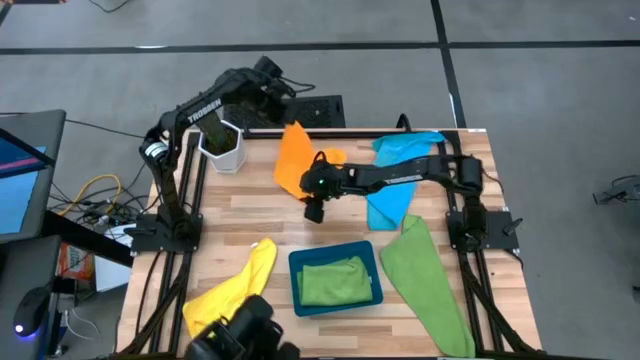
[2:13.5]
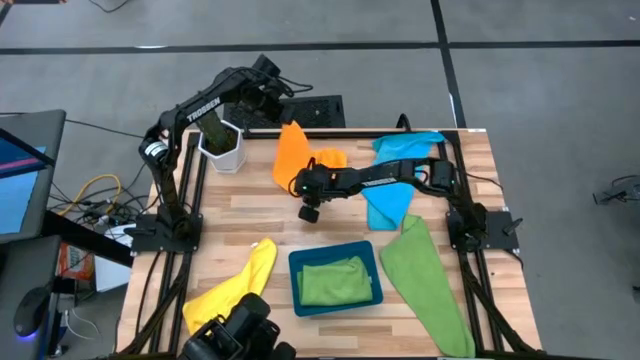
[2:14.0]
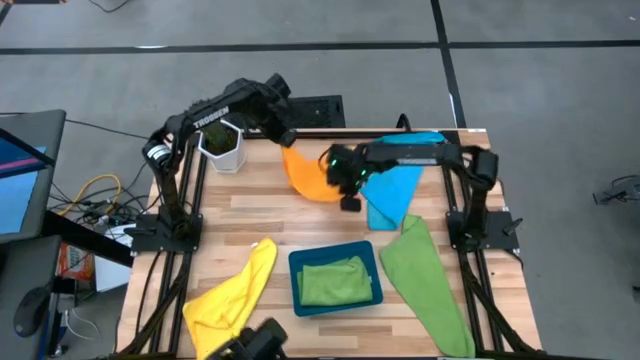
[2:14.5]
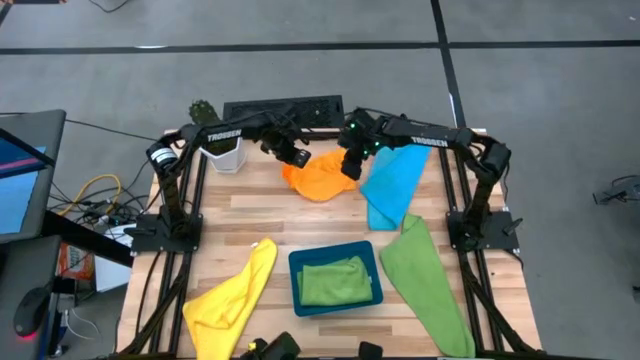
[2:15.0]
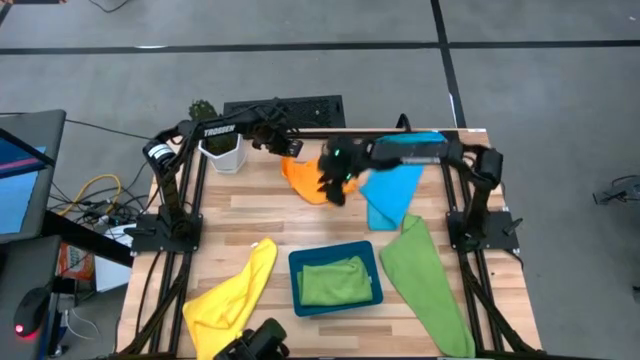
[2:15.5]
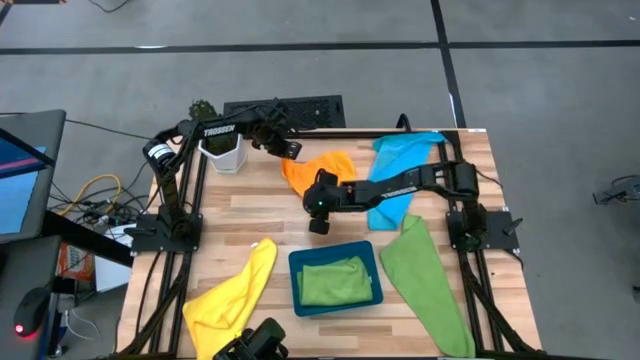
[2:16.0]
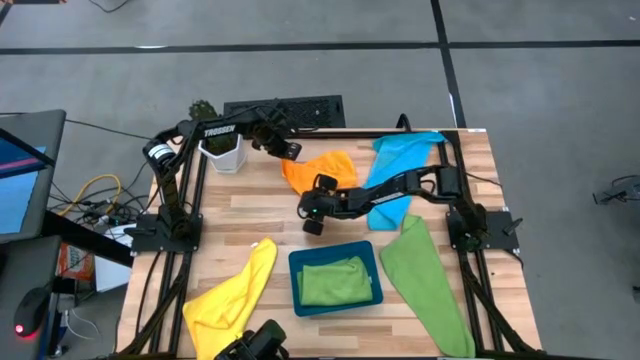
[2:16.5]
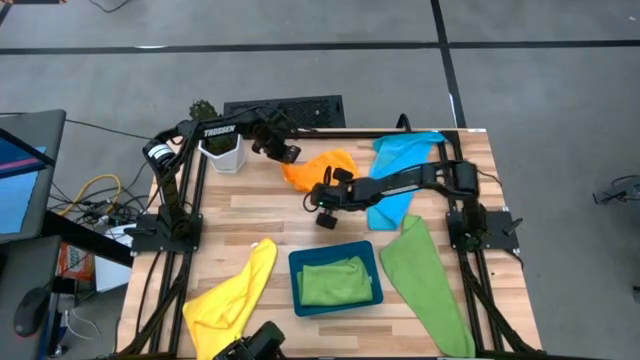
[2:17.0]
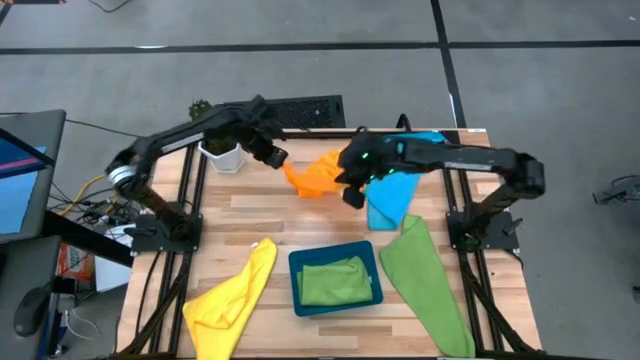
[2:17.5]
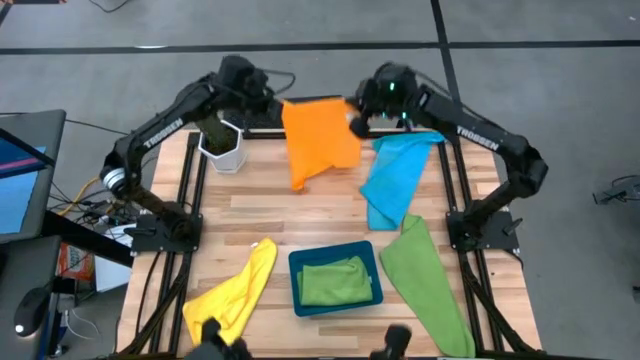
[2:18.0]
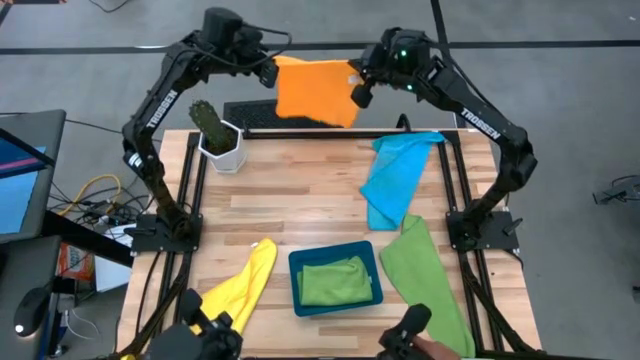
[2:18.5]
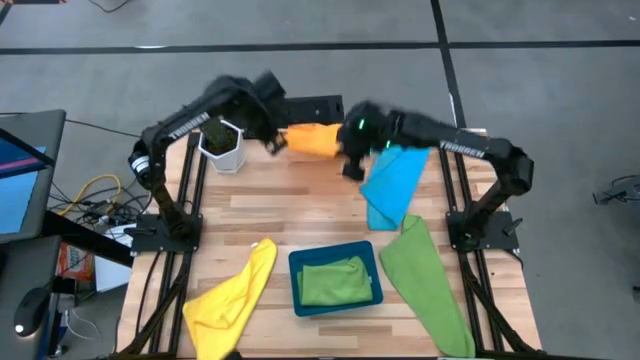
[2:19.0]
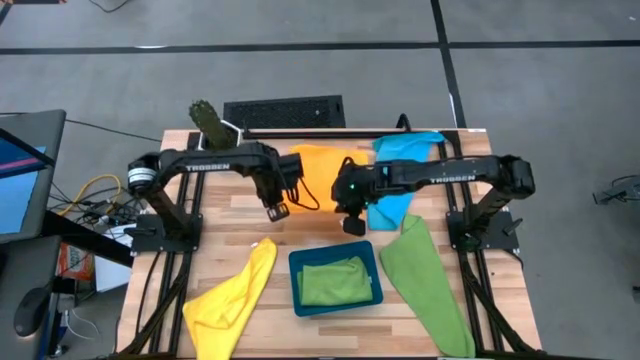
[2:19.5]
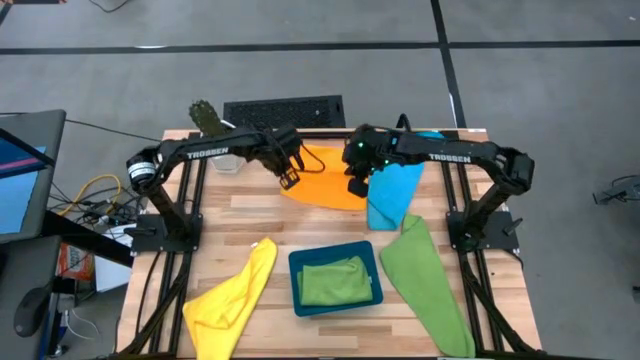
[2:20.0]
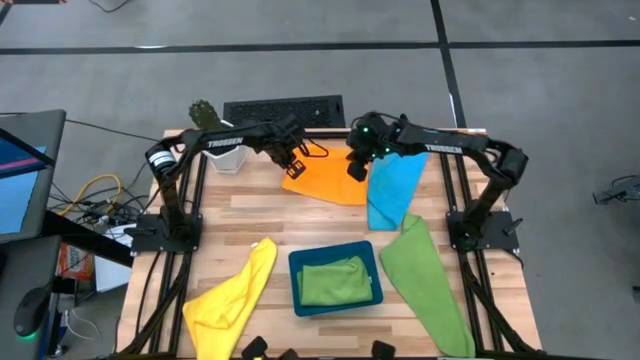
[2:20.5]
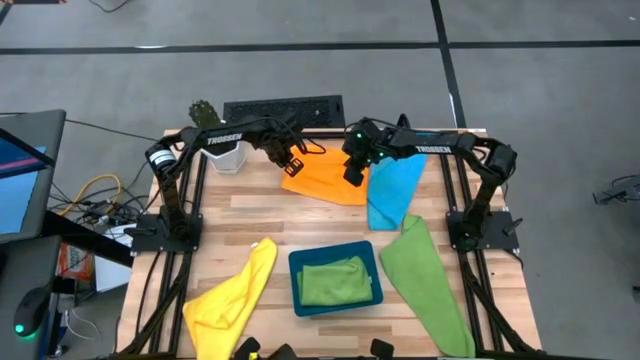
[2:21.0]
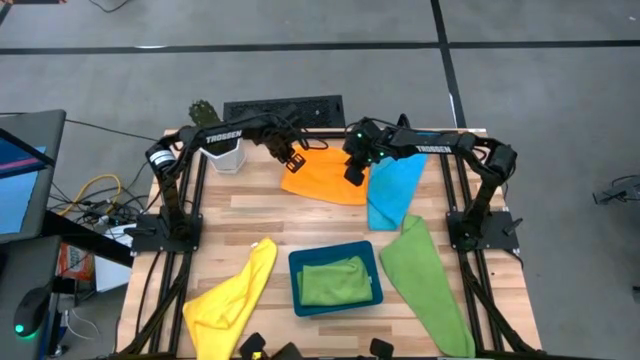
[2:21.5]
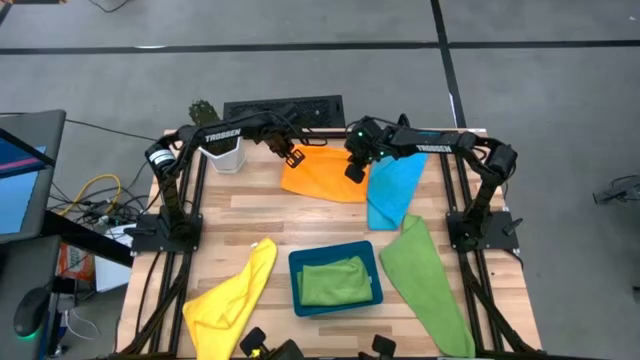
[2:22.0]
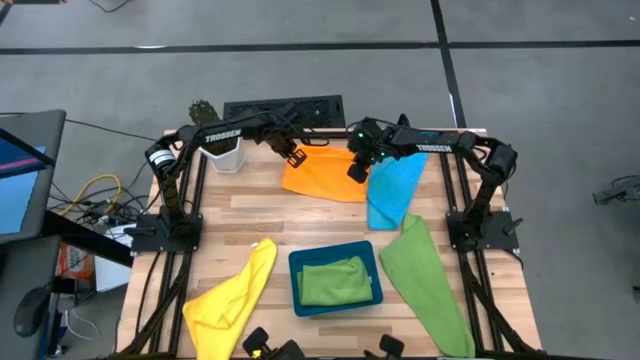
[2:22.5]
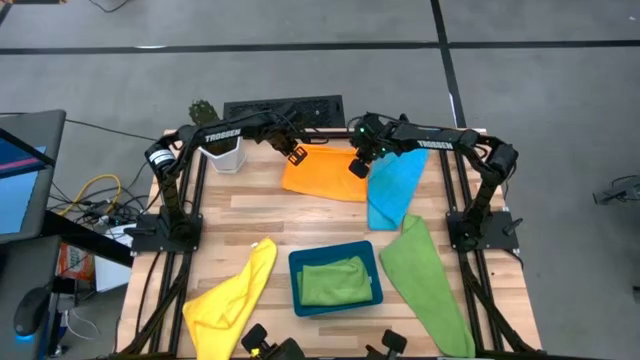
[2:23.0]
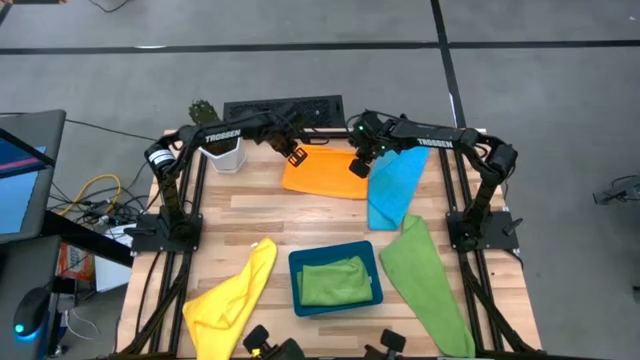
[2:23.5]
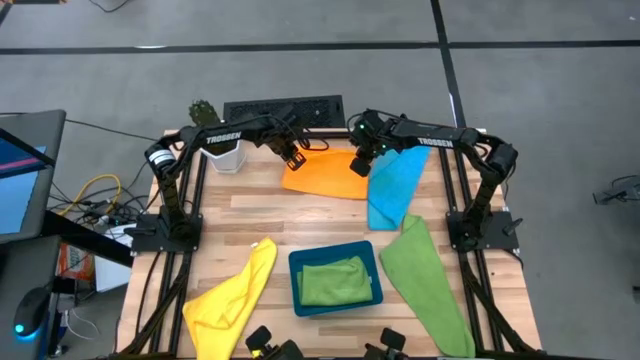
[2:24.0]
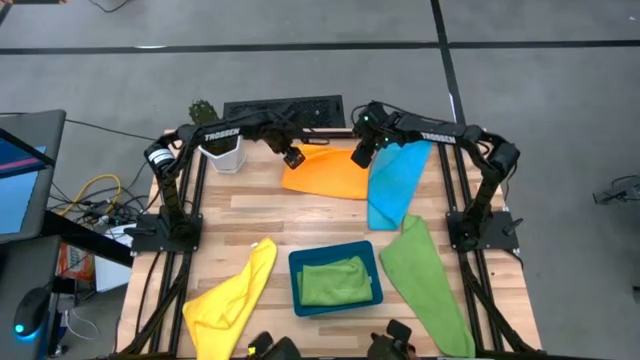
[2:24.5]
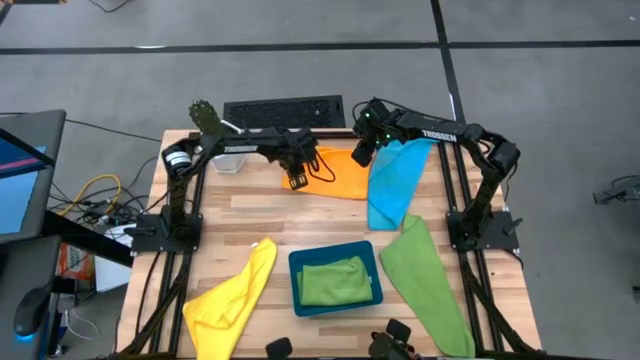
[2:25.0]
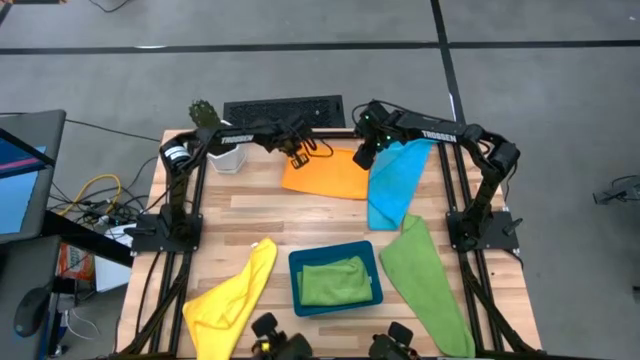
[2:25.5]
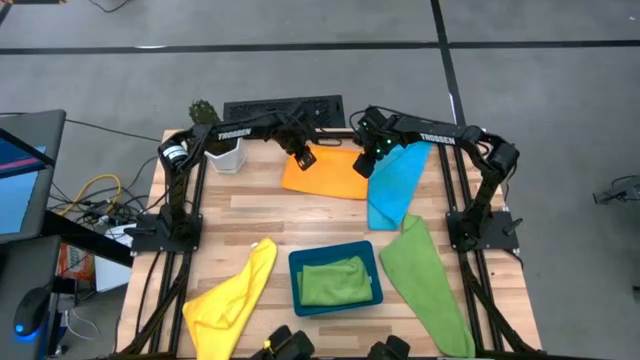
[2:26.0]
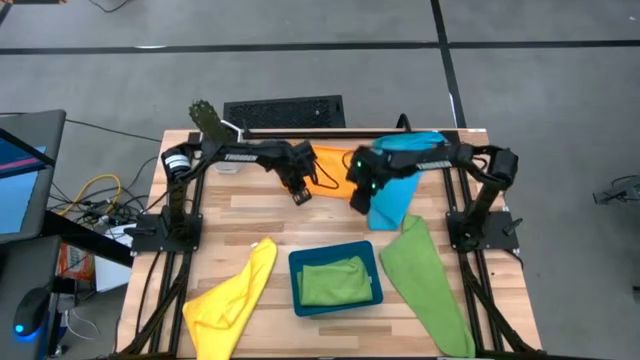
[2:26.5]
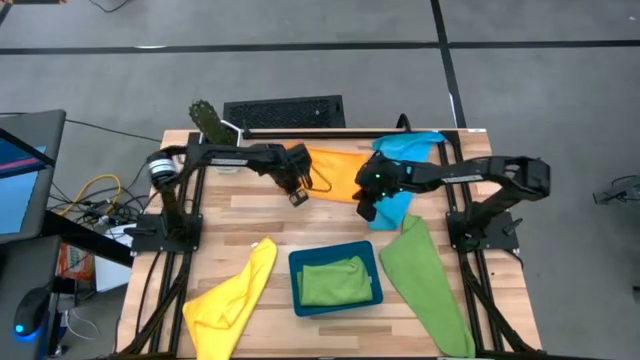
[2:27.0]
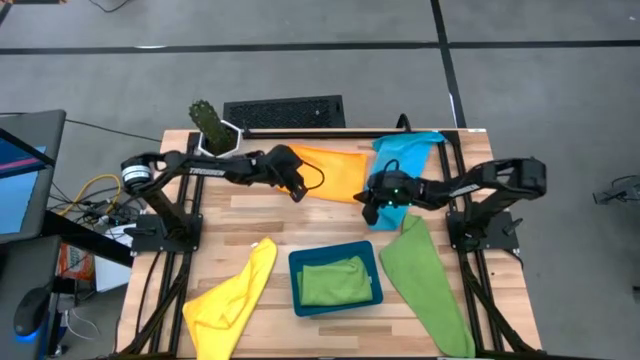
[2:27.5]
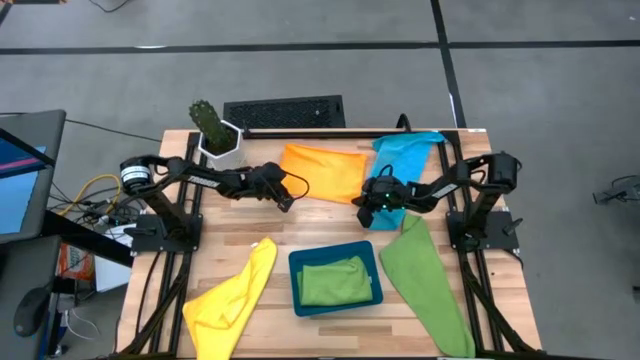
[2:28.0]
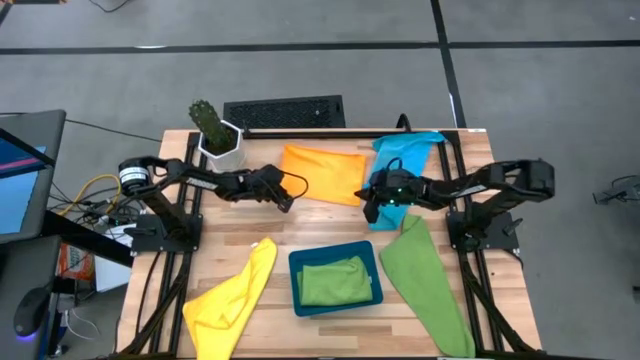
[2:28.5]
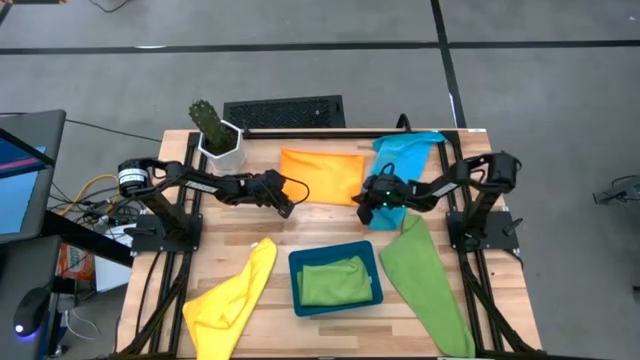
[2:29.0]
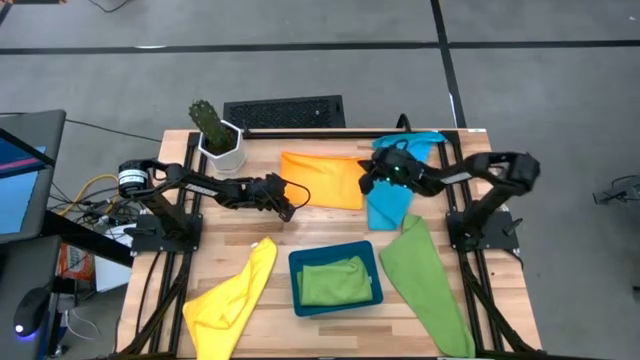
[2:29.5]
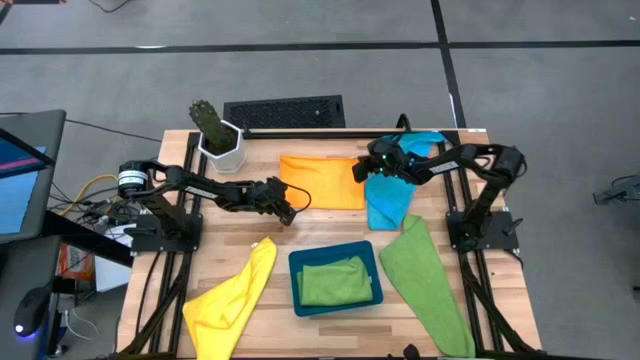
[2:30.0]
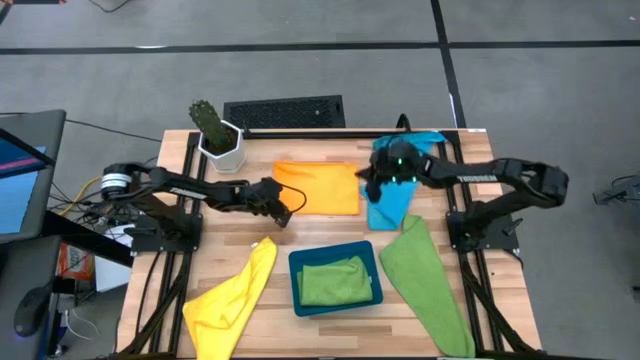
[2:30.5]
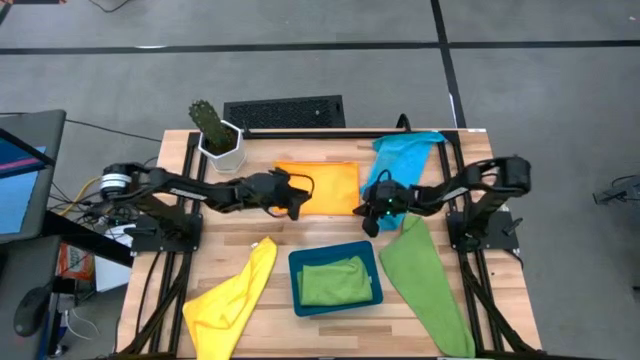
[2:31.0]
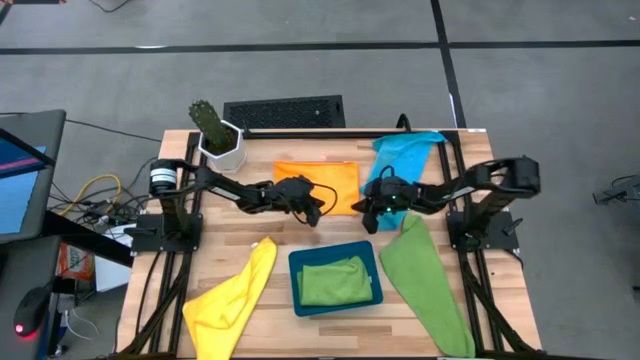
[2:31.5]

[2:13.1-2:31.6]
Task: Fold microfiber towels
Fold the orange microfiber towel

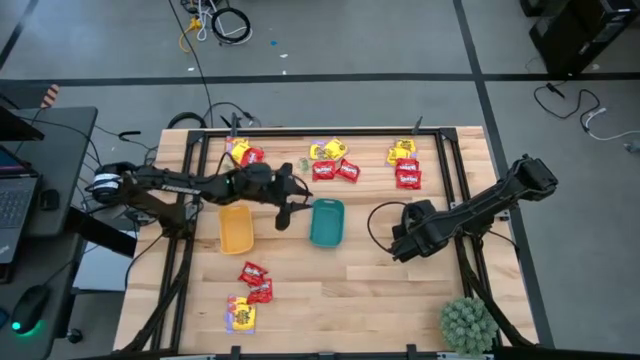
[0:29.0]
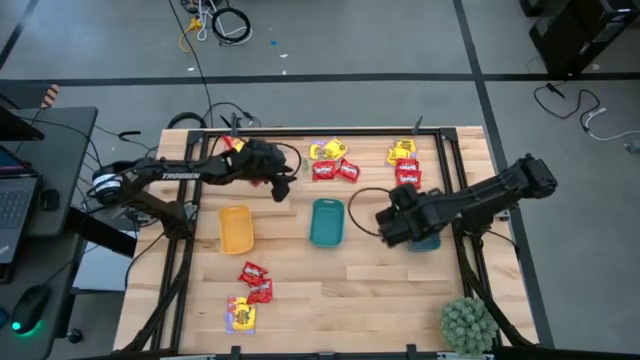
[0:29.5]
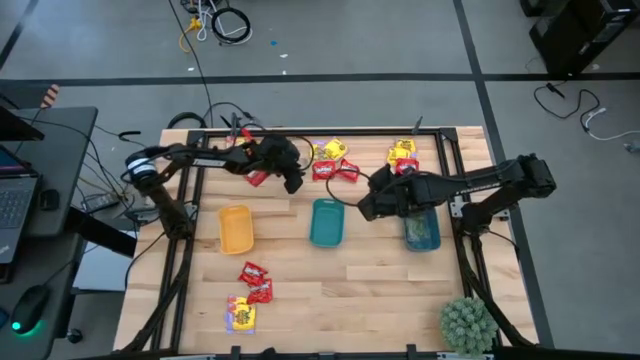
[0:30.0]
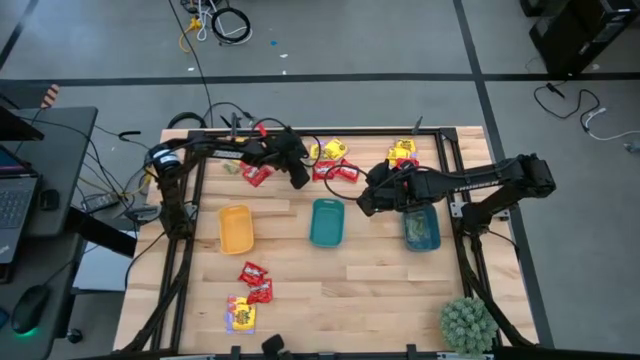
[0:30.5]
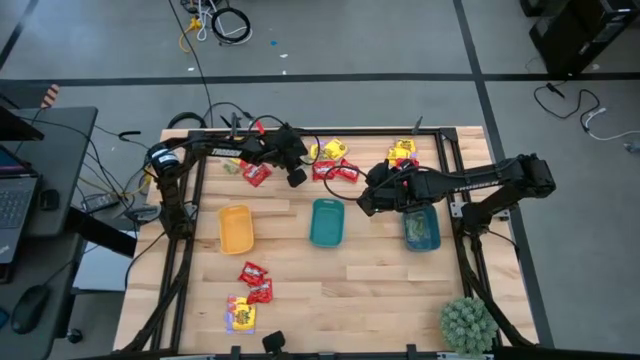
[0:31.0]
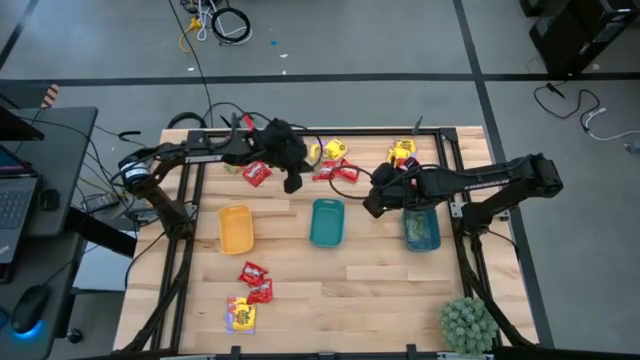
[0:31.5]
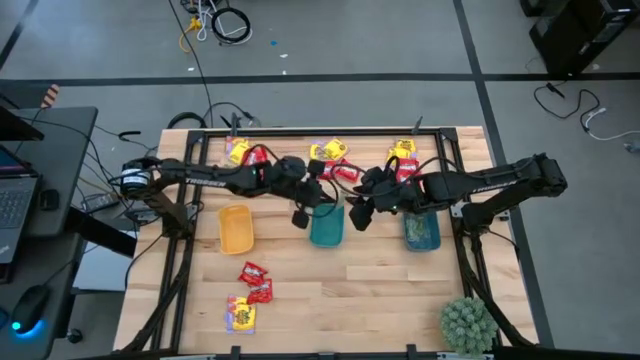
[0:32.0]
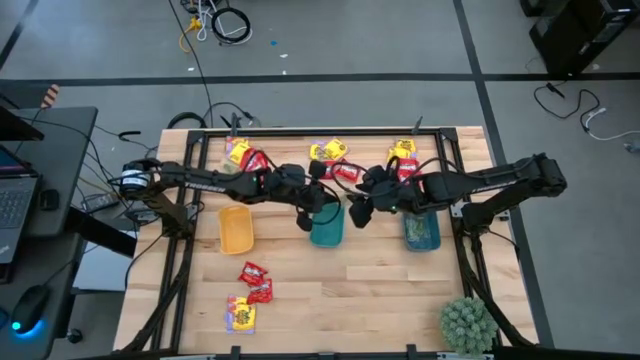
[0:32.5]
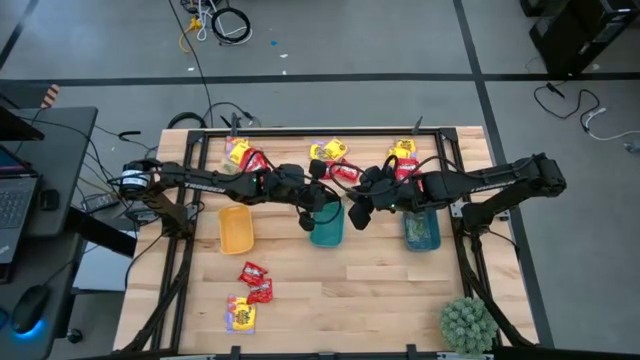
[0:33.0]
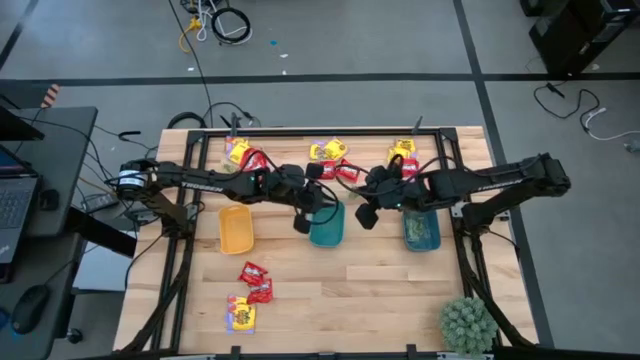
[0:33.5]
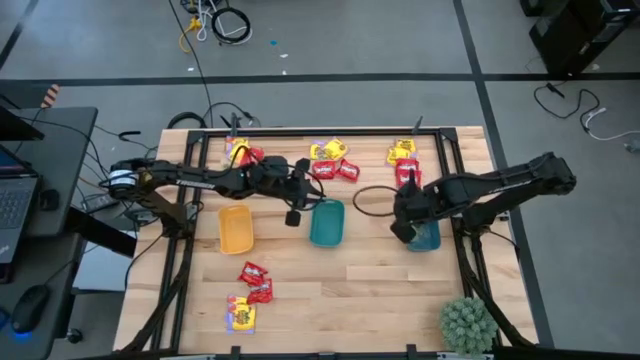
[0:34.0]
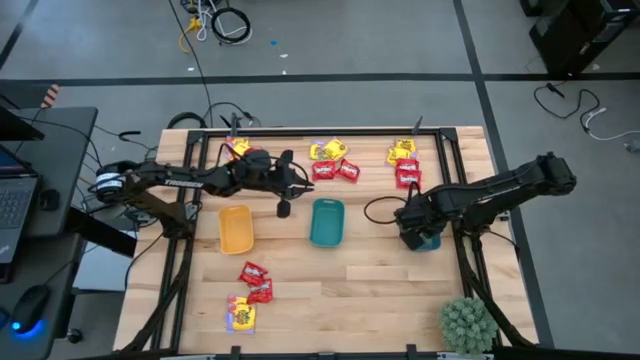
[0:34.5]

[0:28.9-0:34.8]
Task: Sort candy
Put the green transparent candy into the blue bin
